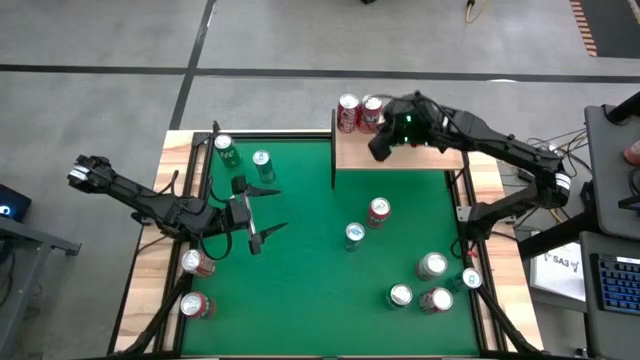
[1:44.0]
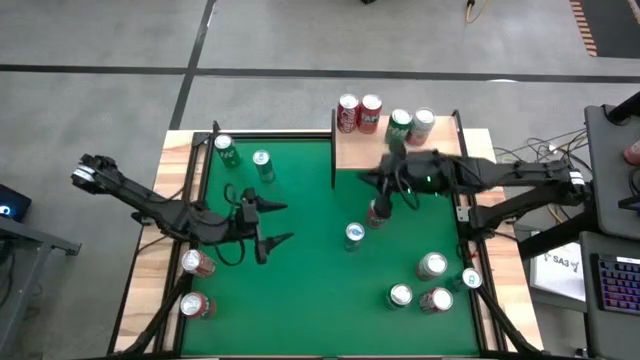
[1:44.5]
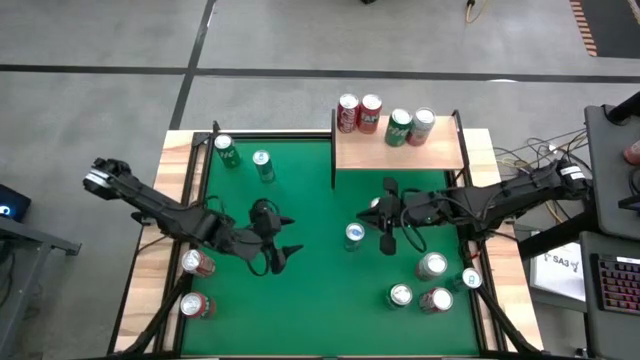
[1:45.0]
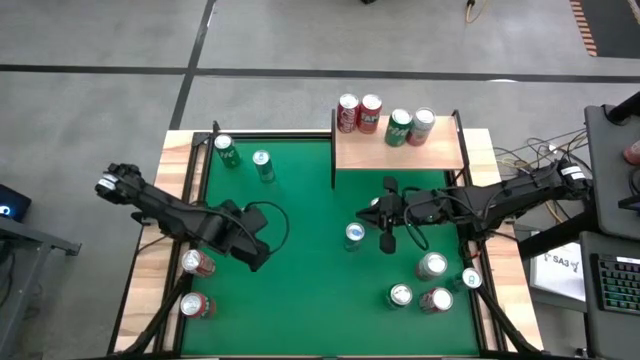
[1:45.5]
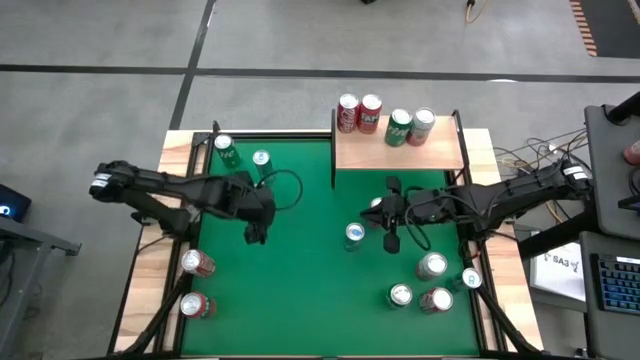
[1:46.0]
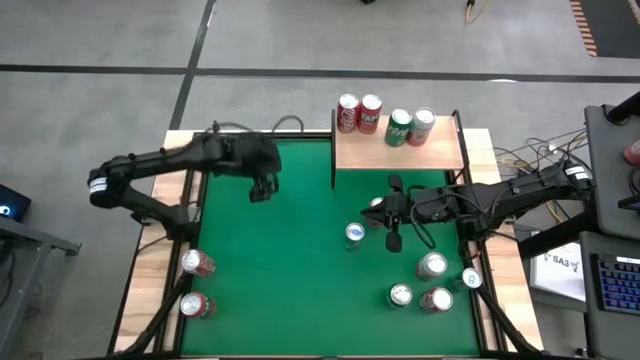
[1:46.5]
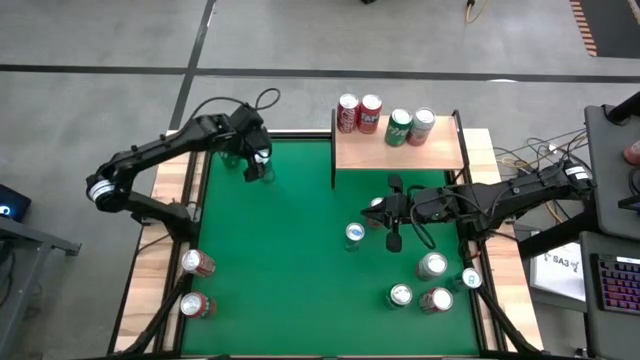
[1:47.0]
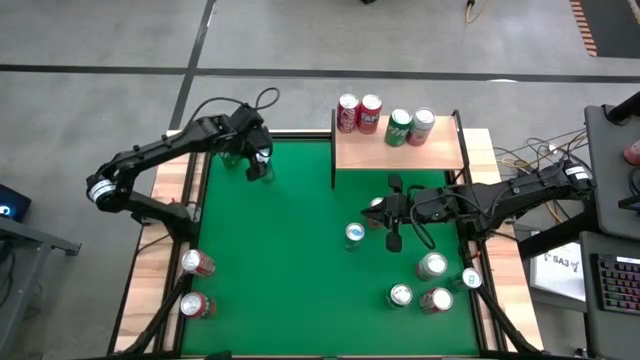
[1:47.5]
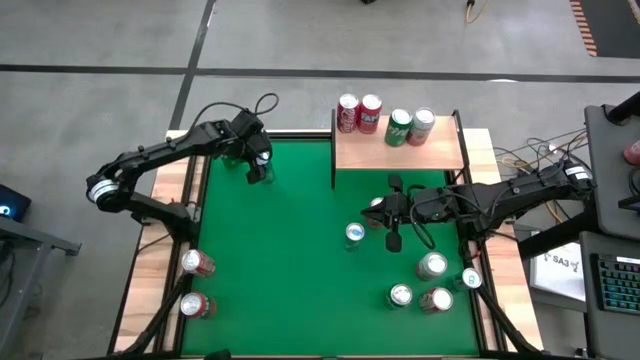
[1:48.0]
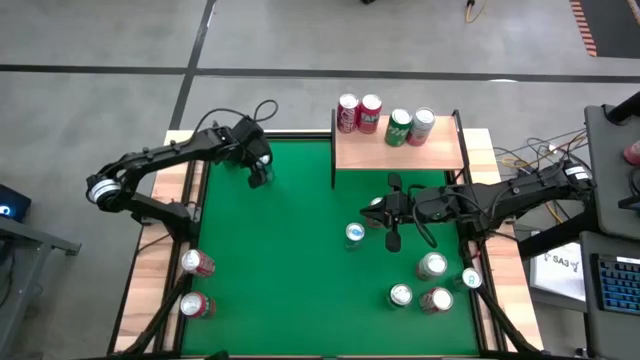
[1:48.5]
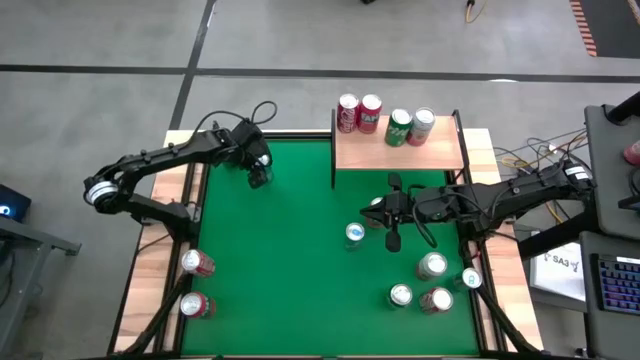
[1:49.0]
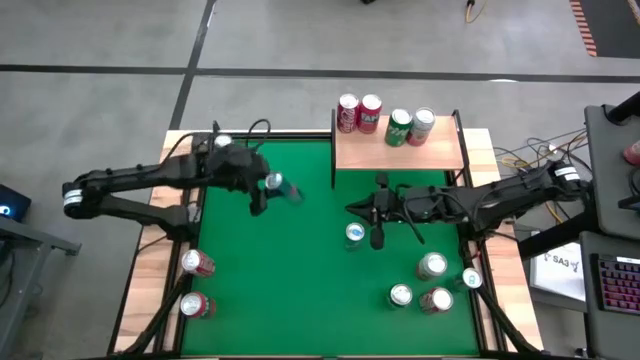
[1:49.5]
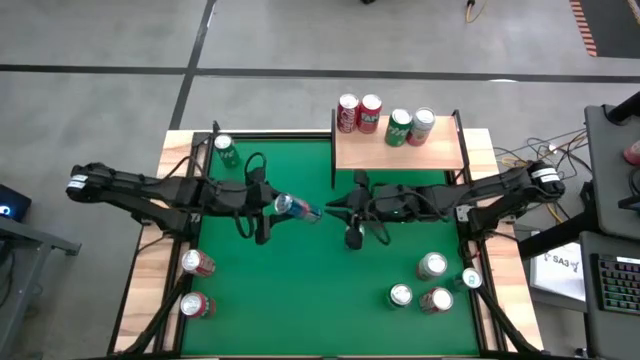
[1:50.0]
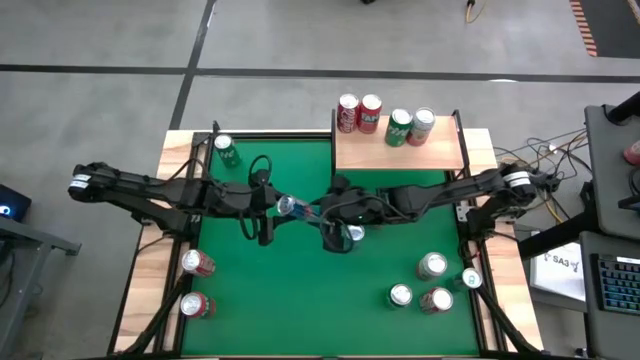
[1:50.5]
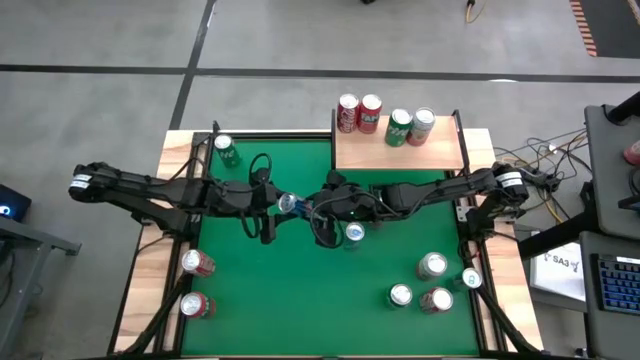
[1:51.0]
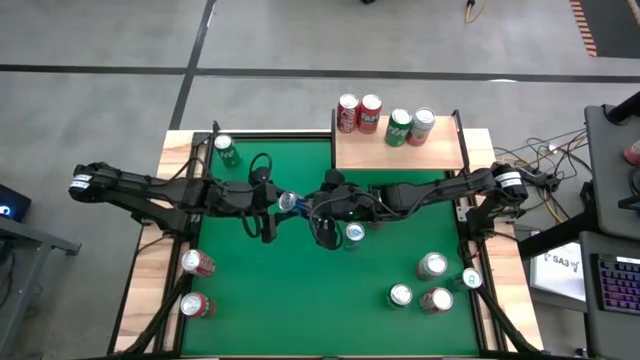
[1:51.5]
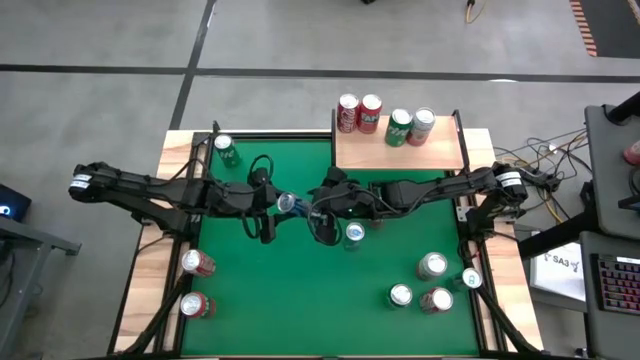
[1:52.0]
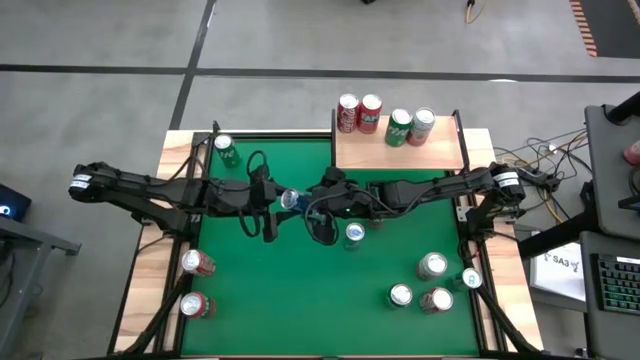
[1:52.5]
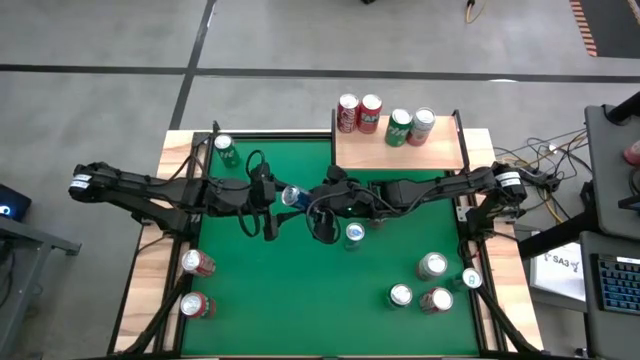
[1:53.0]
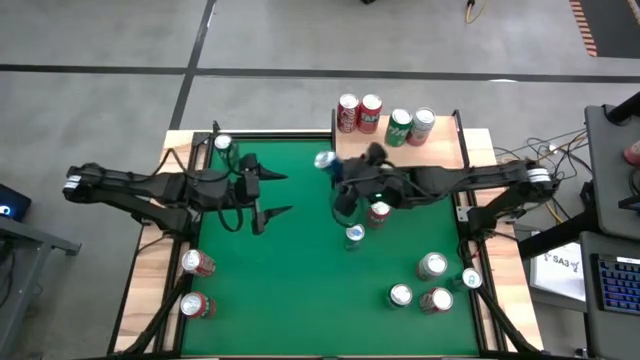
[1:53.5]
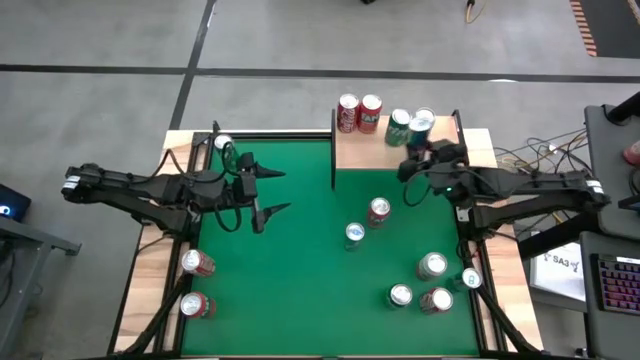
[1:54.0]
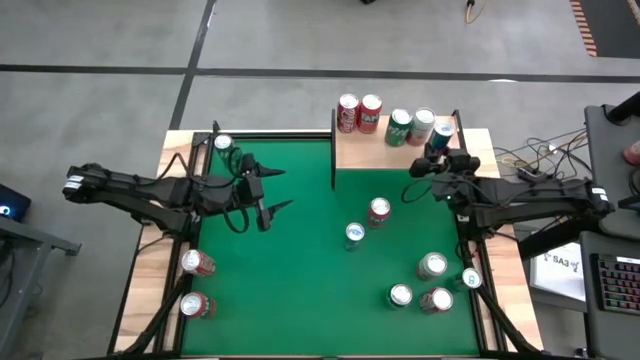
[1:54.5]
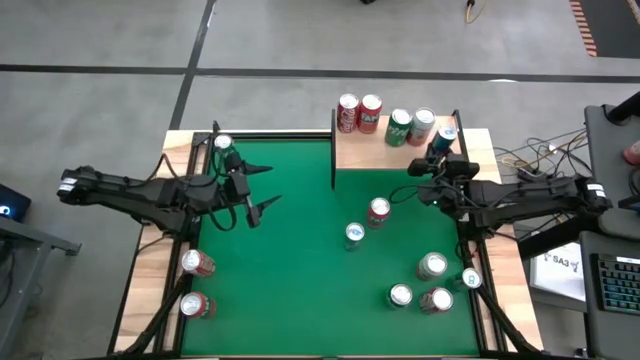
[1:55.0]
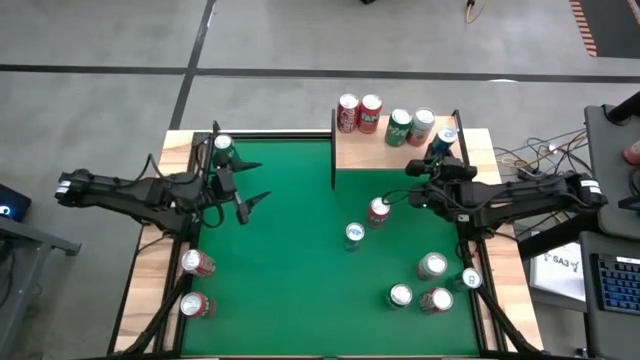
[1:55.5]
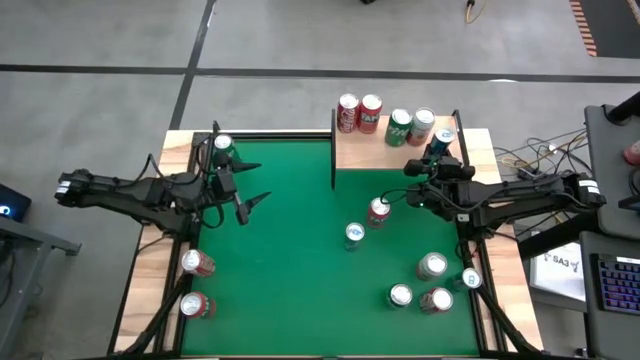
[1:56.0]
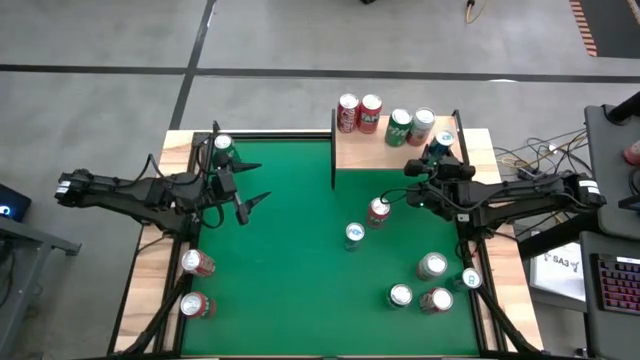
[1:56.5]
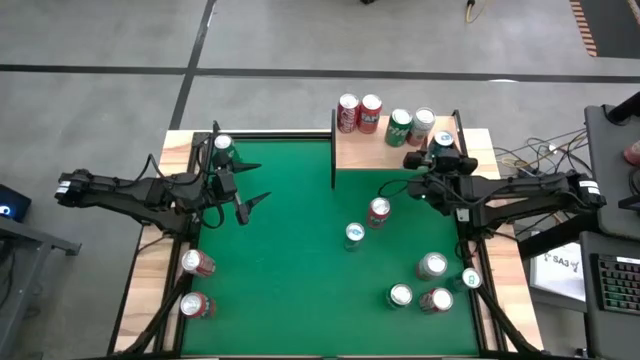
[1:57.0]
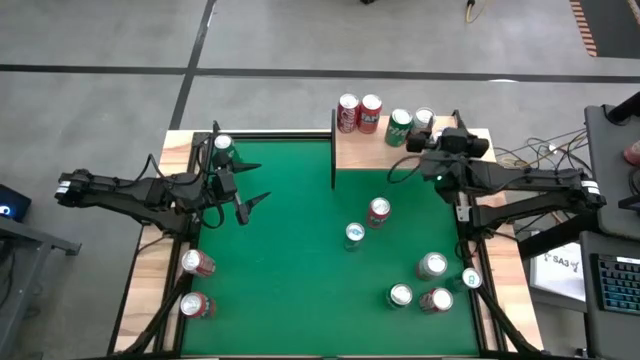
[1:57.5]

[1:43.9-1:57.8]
Task: Place canned beverage on shelf
Put the top blue soda can on the shelf

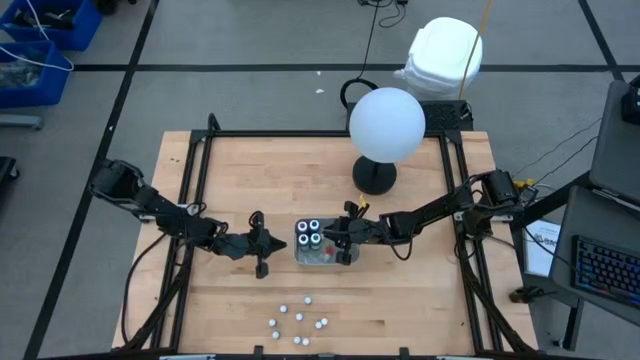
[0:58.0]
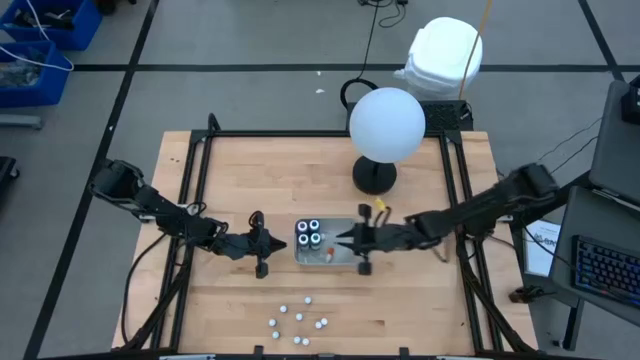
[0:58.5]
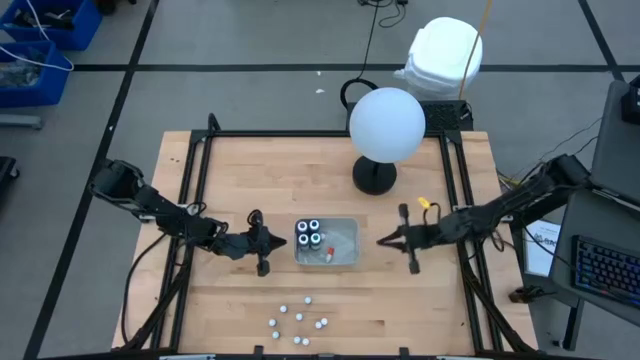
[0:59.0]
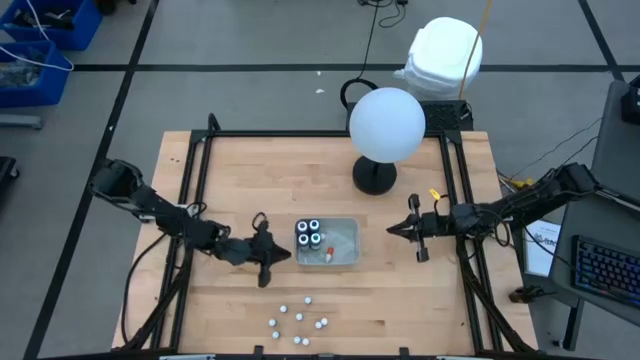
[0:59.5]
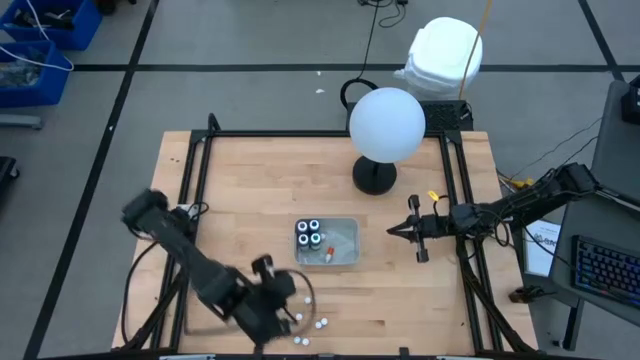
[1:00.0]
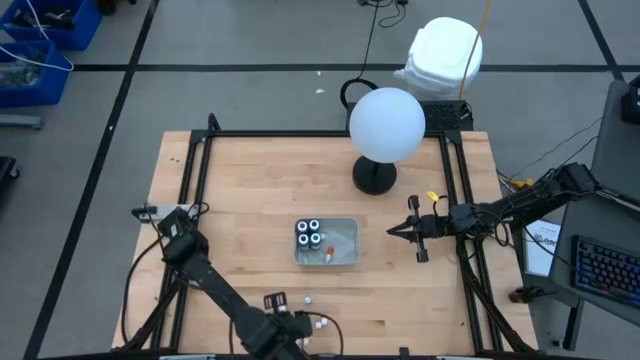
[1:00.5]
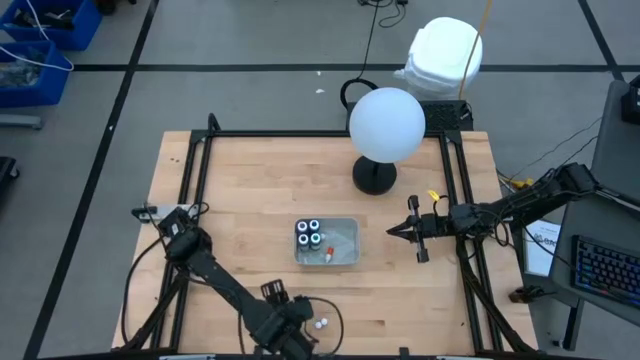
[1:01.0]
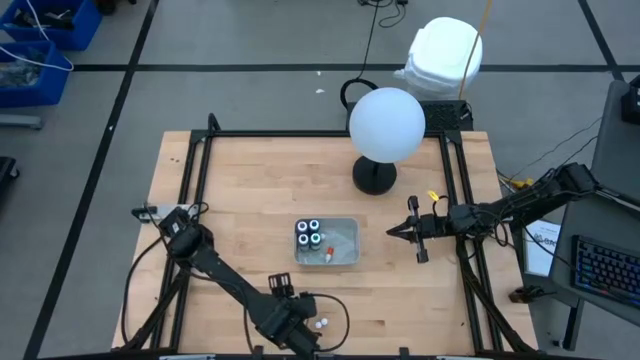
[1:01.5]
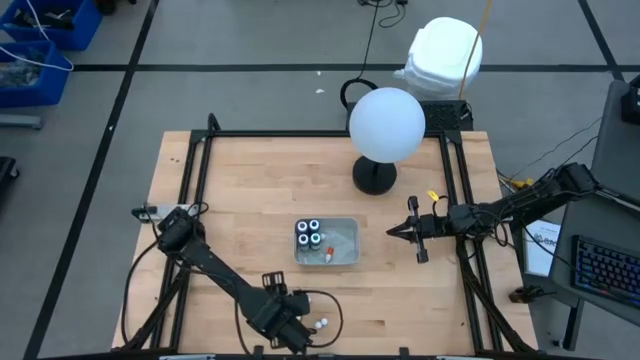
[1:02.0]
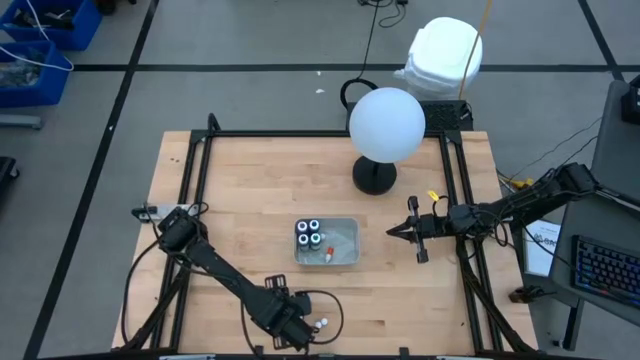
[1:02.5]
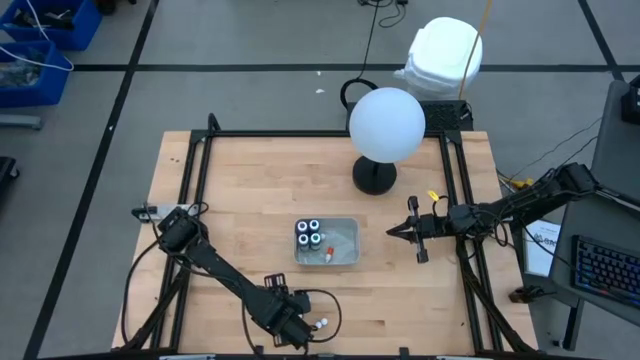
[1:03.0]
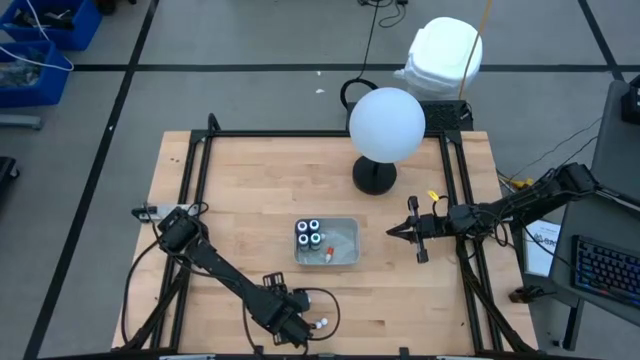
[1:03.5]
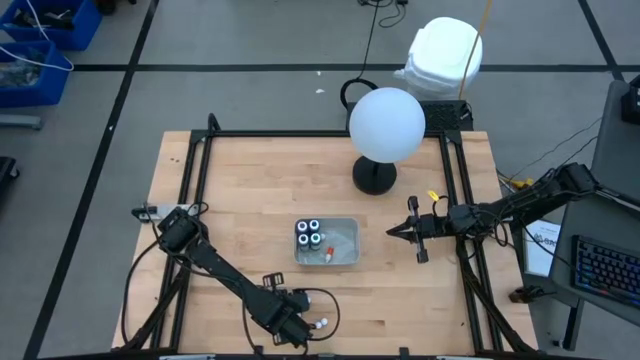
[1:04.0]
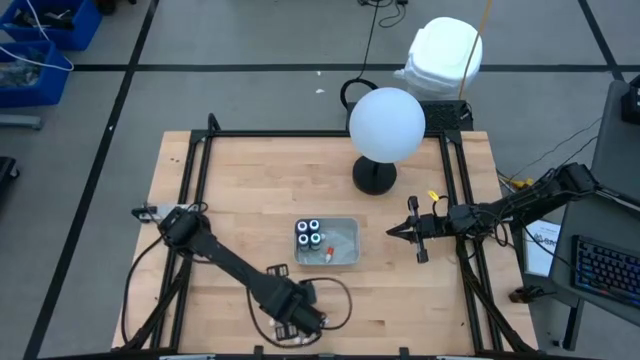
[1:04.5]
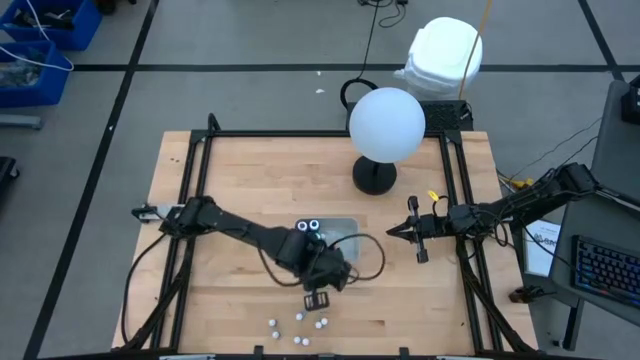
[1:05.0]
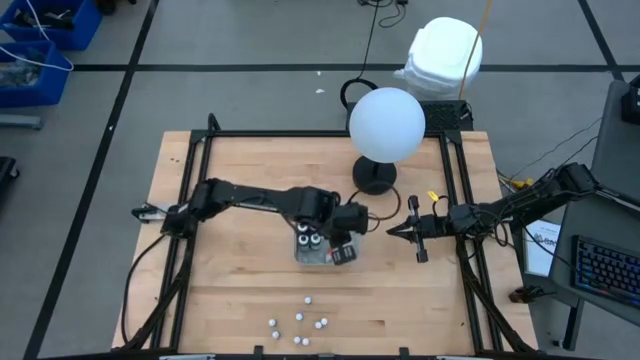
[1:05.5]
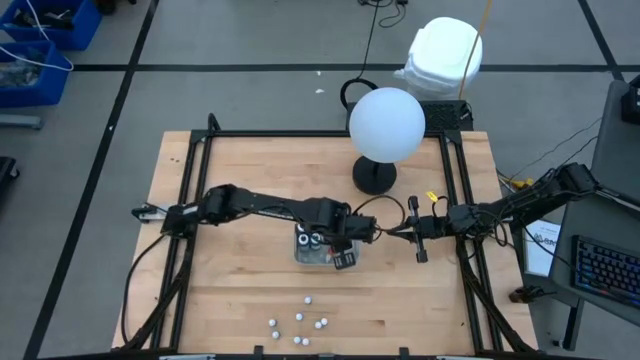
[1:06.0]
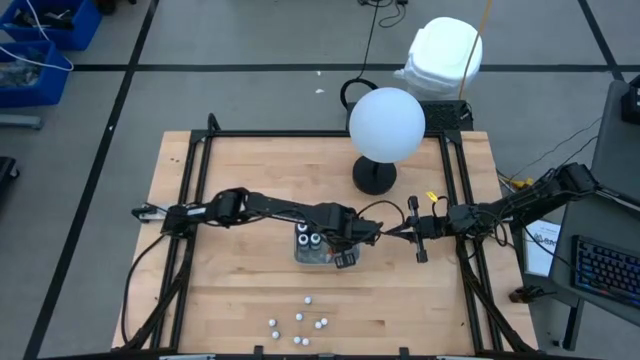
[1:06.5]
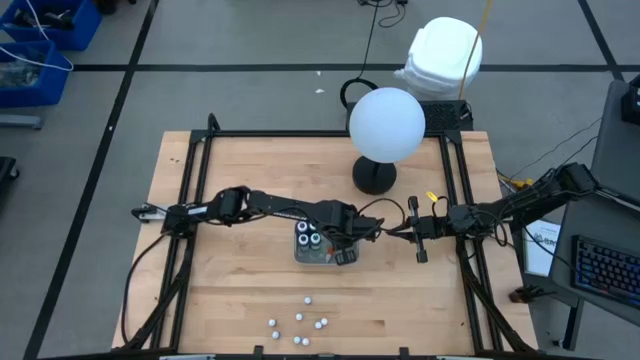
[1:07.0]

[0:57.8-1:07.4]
Task: Pick & Place food coloring
Put the small violet food coloring bottle into the gray bin
